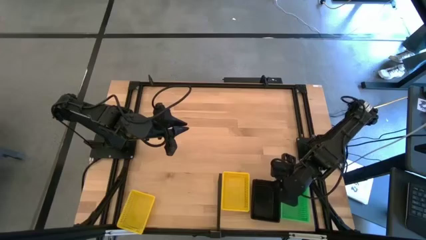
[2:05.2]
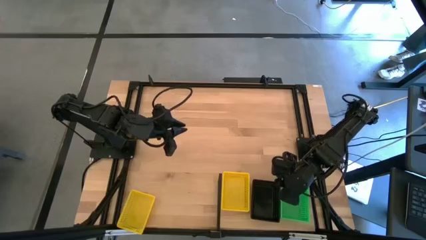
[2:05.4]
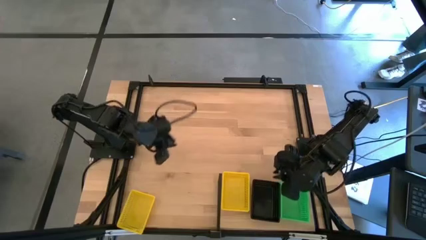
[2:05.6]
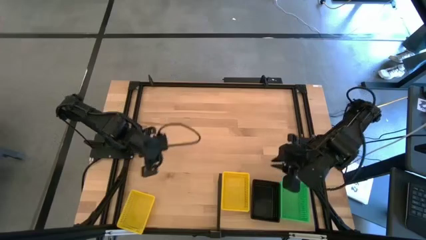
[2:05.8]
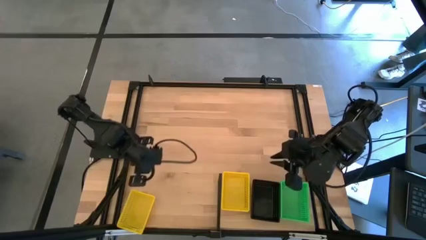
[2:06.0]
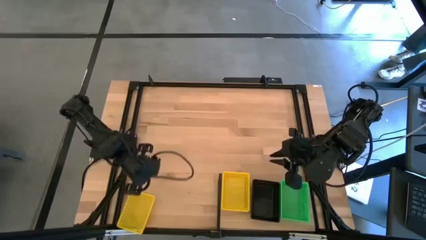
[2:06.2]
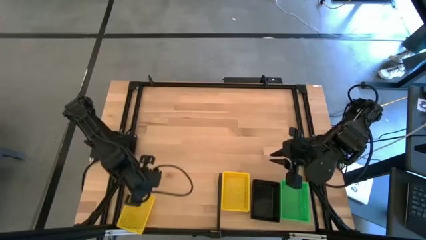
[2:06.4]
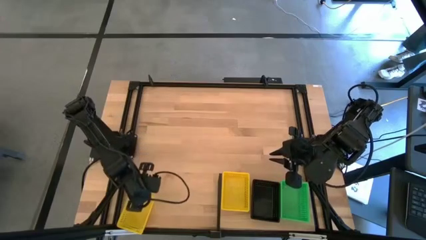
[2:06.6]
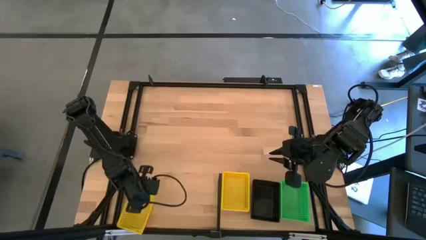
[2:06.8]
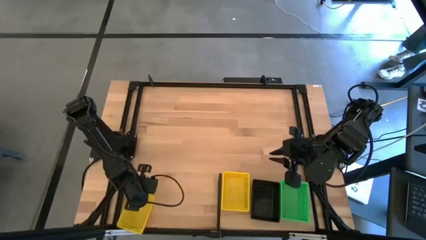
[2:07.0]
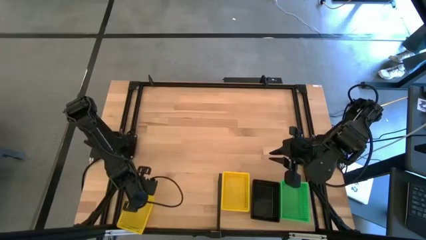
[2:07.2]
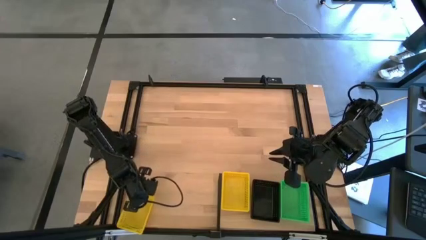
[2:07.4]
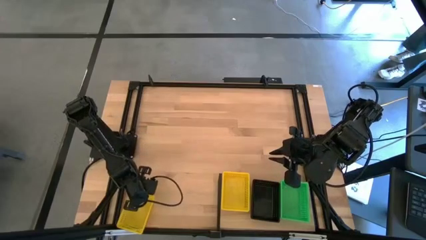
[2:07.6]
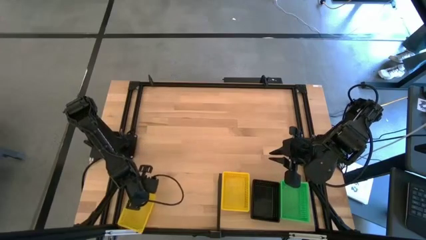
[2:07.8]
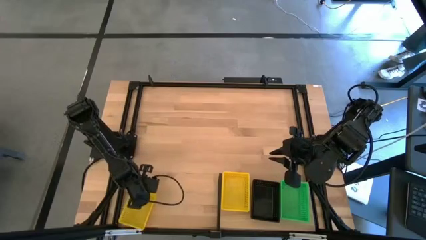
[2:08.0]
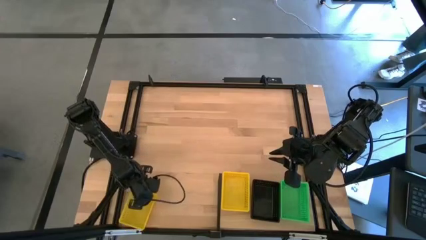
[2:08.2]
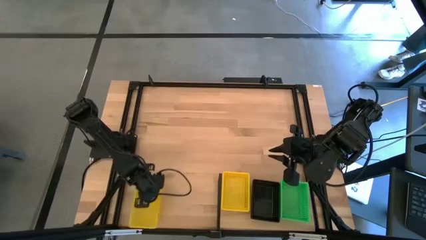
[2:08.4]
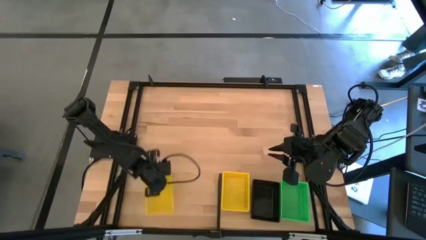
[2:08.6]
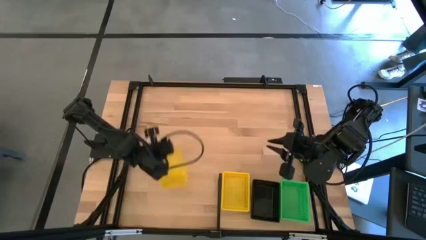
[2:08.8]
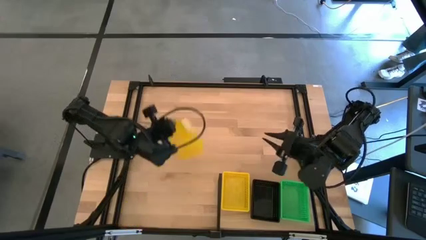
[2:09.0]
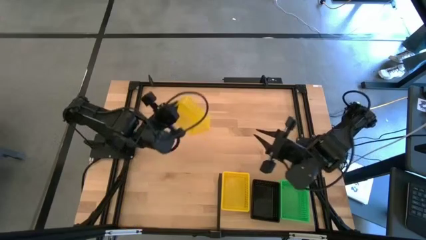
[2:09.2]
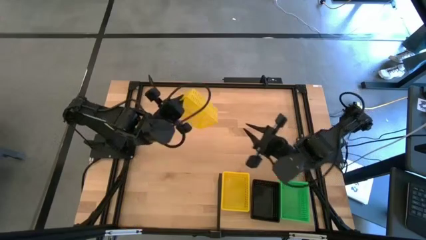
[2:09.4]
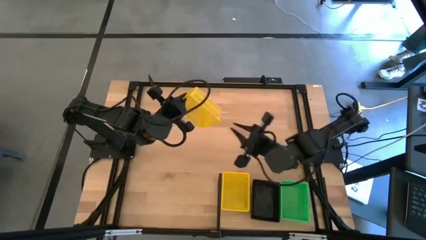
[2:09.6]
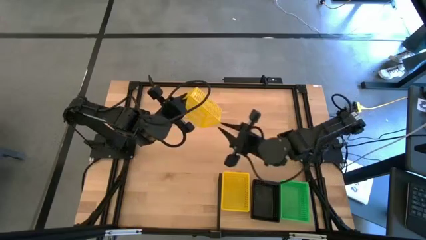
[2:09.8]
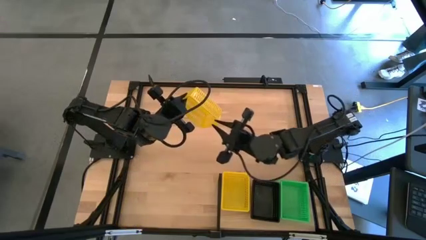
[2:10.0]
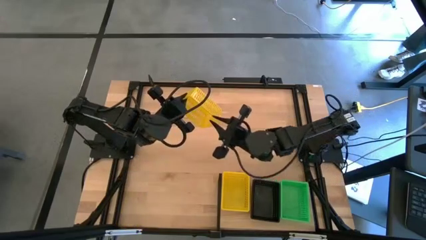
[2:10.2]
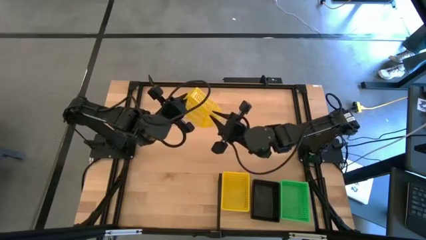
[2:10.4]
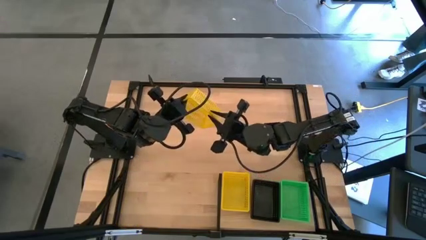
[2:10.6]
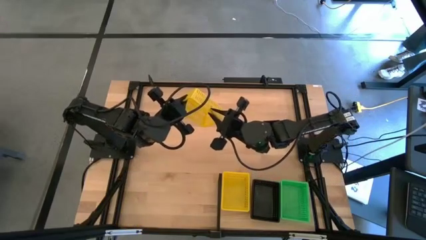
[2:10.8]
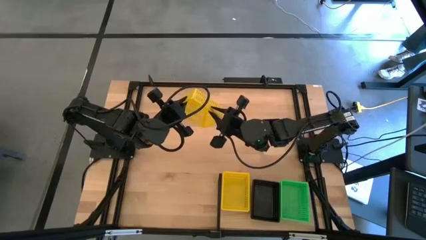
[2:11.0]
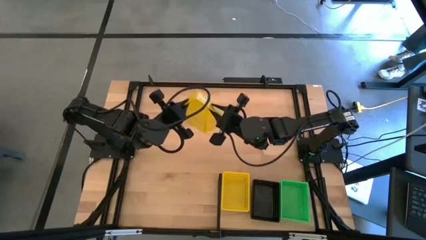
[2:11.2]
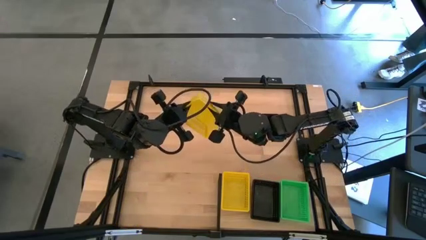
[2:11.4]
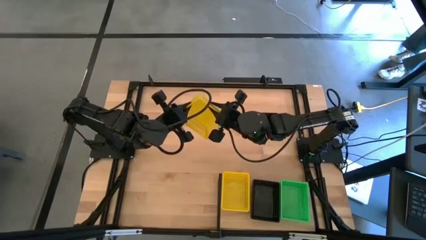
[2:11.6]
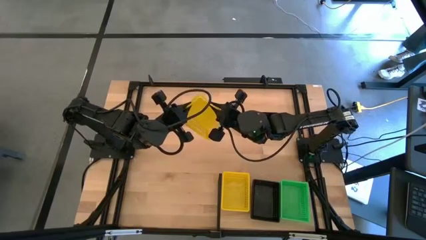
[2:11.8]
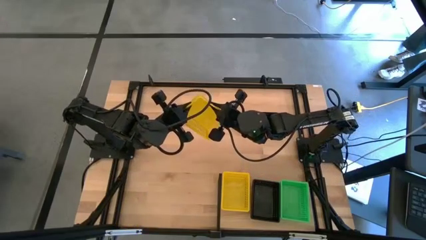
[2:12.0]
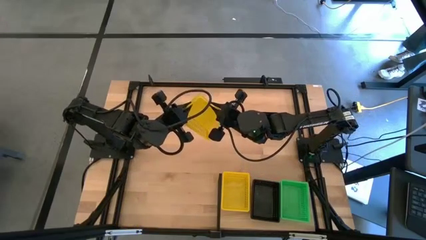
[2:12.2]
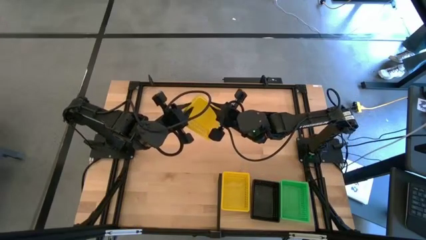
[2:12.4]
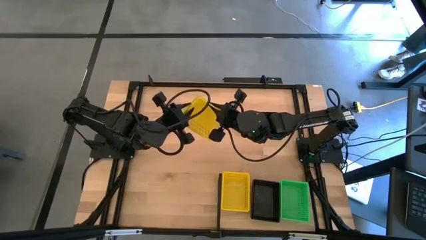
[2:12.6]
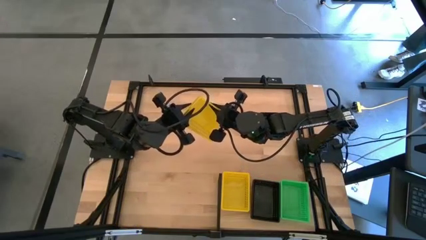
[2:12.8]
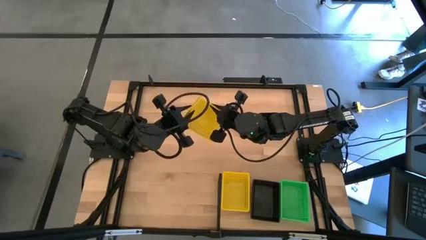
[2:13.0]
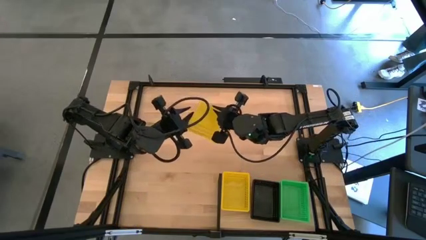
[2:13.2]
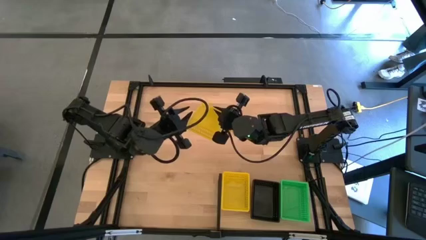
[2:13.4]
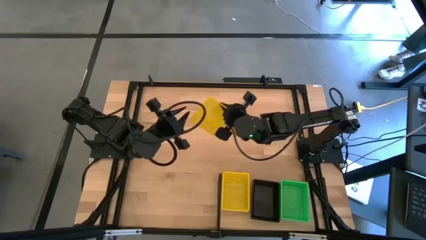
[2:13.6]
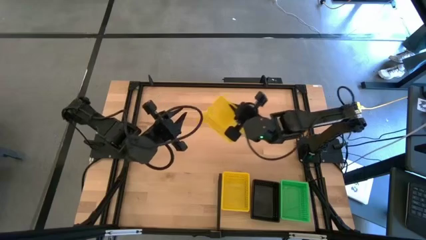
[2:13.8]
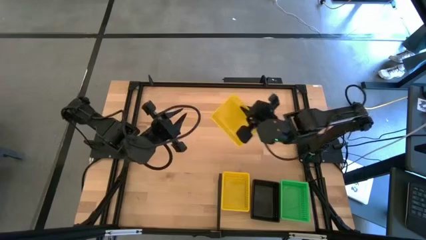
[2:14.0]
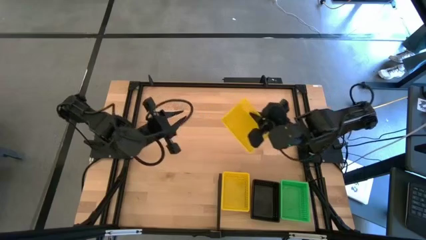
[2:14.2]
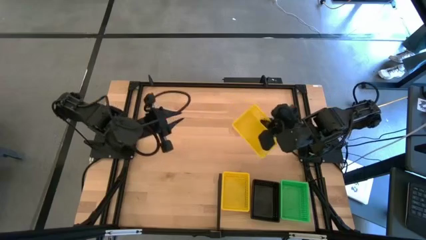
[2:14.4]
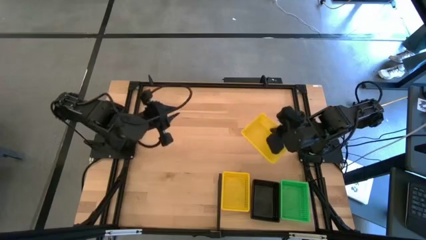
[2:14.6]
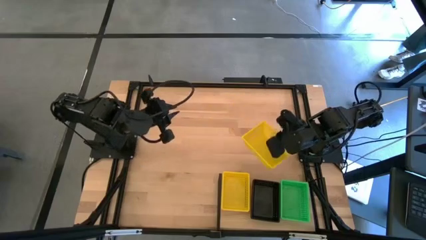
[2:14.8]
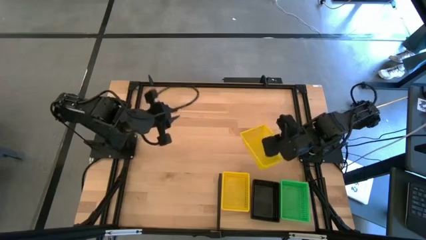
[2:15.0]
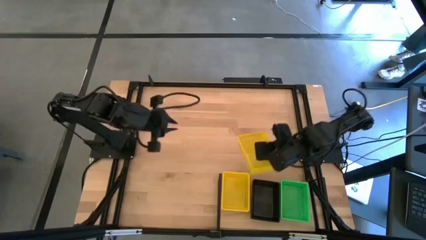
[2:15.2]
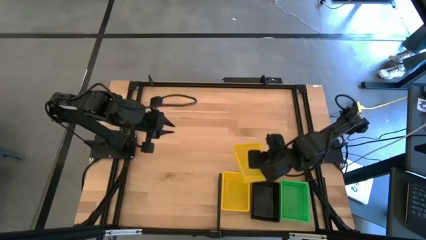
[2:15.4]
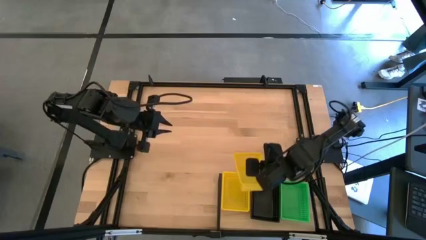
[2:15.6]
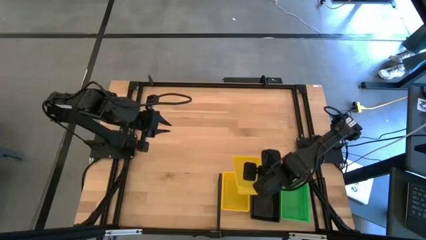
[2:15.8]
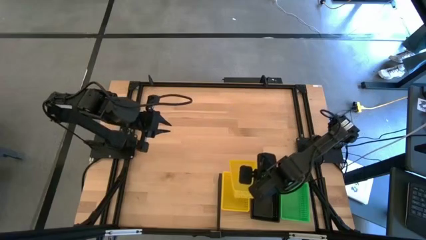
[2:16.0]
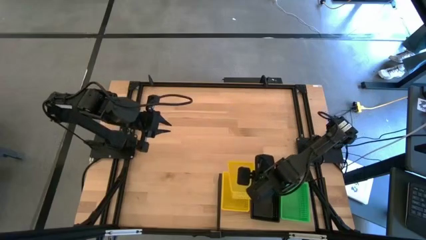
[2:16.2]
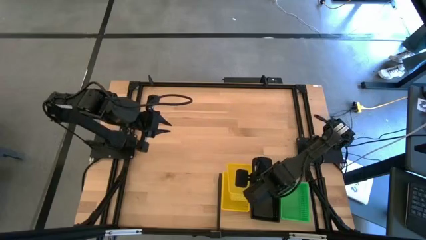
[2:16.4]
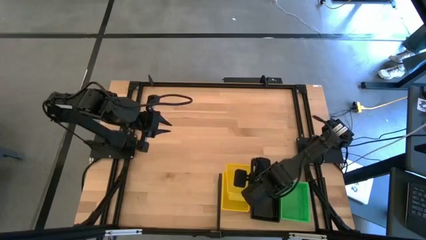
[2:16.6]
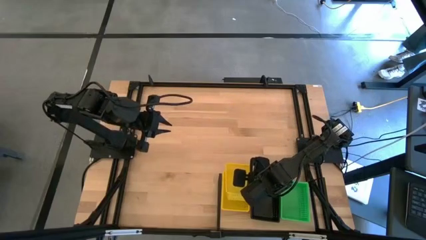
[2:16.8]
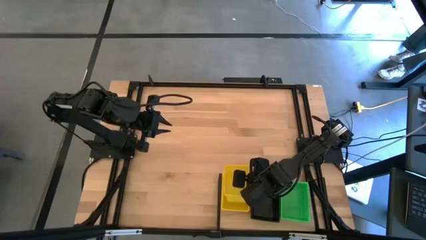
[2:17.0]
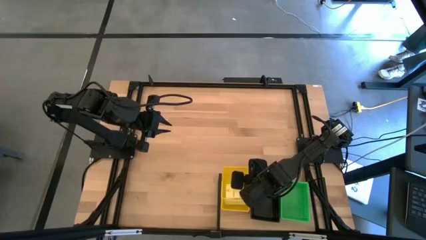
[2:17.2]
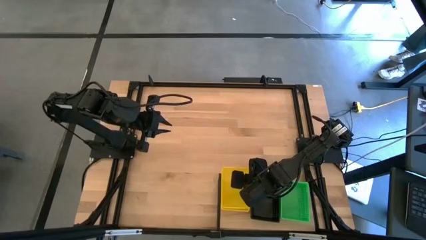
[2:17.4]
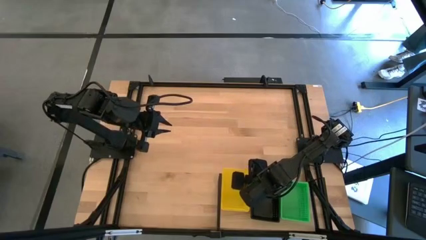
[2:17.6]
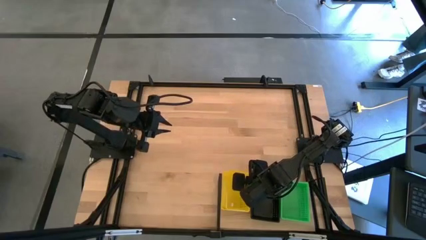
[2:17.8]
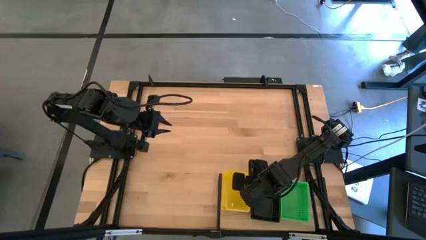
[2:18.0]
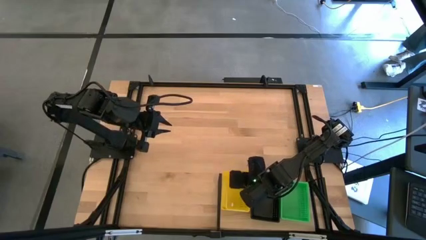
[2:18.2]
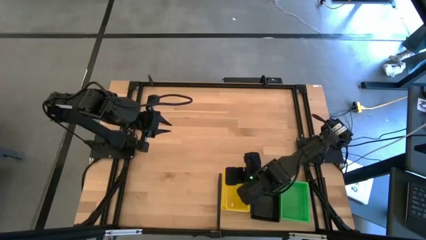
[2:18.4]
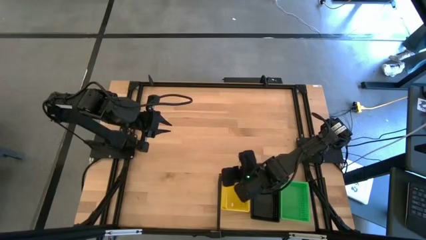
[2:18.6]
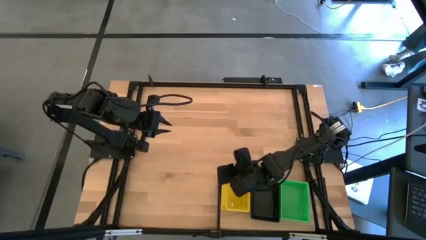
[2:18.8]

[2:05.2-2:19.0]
Task: Stack baskets on shelf by color
Stack the yellow bin on top of the yellow bins on the shelf

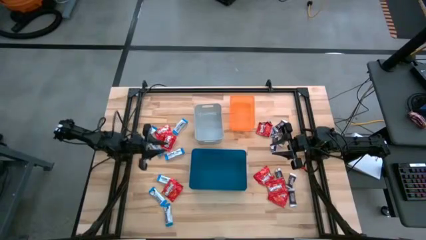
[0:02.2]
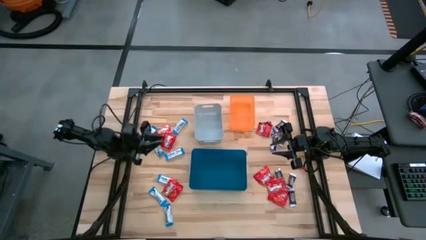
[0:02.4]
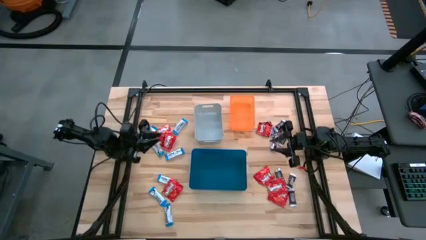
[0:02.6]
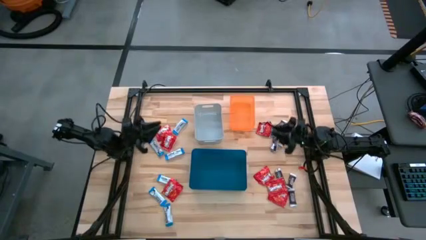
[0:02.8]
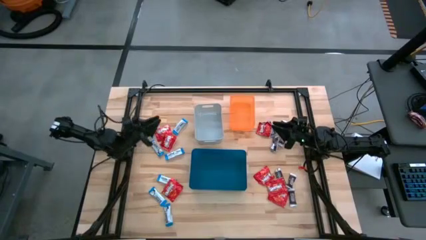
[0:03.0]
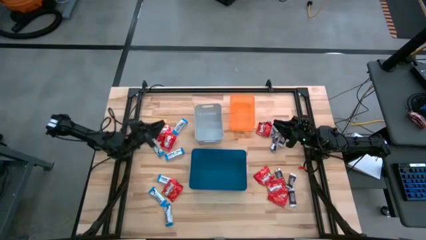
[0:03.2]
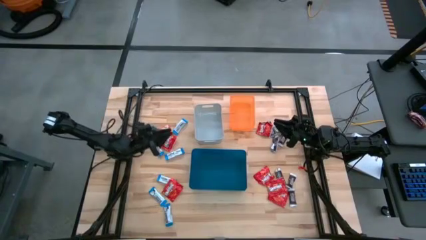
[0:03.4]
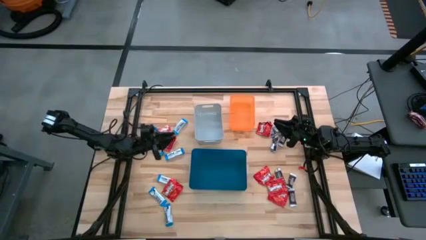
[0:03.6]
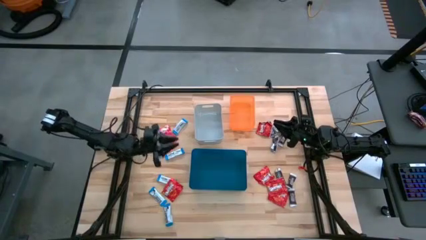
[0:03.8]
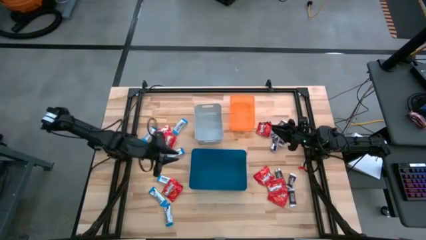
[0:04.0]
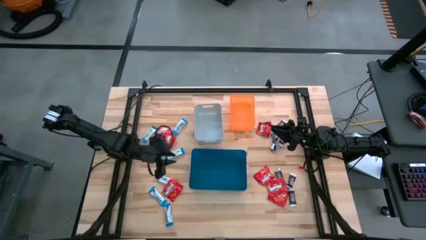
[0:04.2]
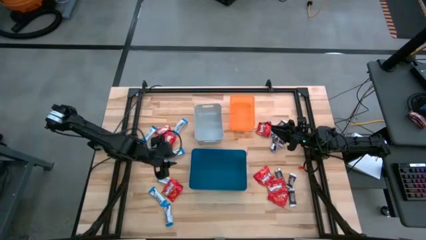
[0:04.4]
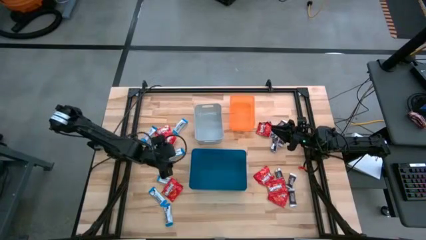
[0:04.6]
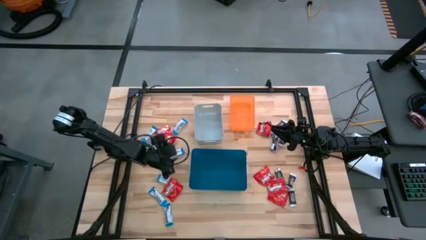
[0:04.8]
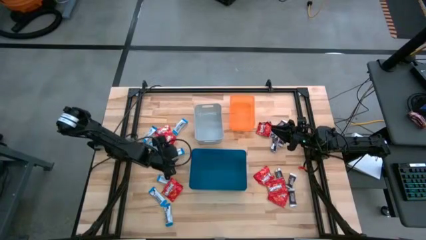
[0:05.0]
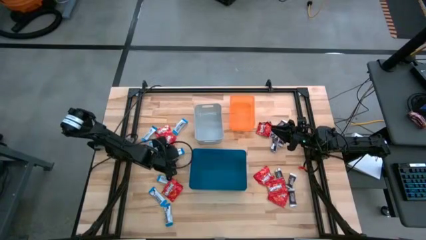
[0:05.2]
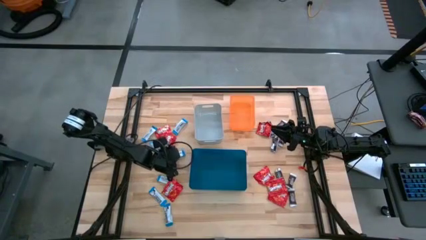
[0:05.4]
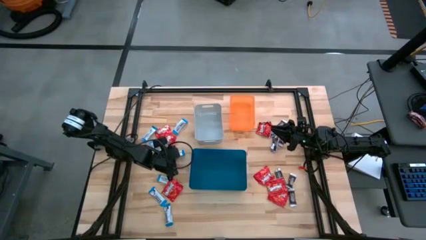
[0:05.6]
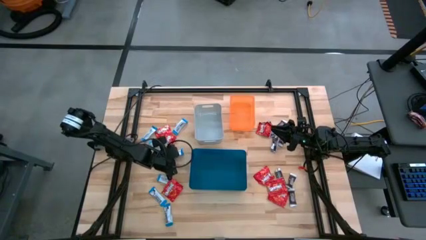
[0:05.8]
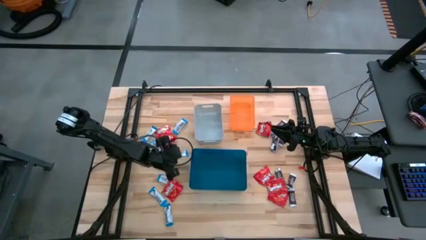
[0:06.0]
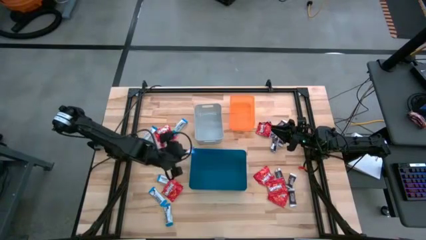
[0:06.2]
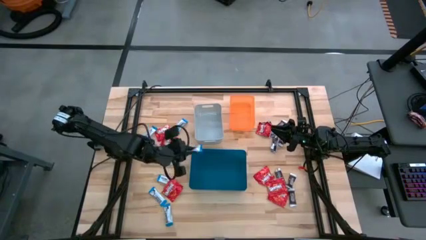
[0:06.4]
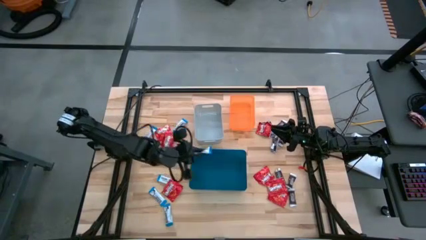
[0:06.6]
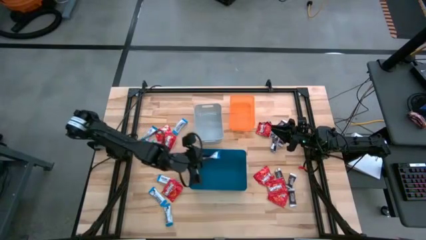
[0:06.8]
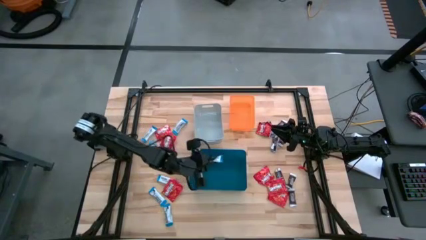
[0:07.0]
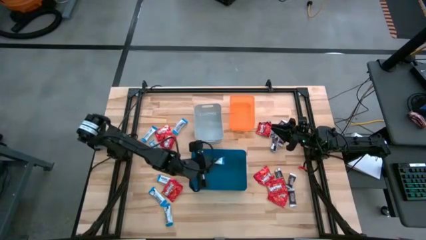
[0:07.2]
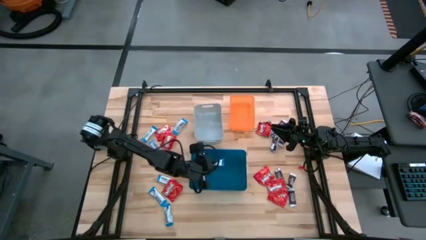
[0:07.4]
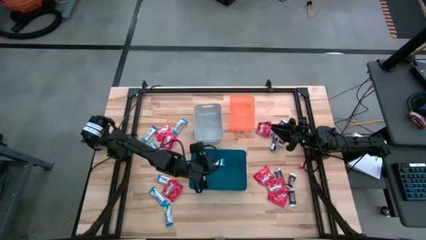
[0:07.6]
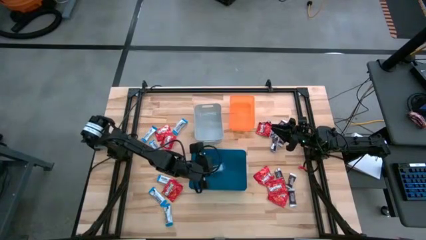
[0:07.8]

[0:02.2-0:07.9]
Task: Sort candy
Put the white chocolate bar into the blue bin
